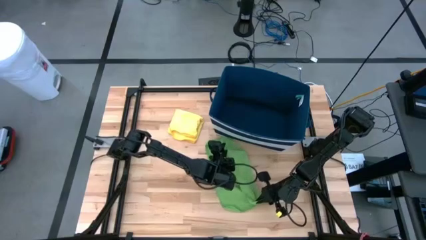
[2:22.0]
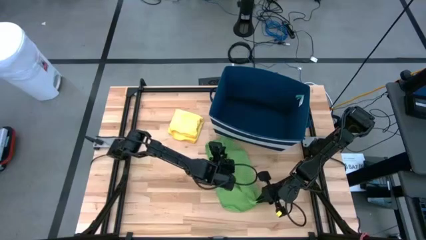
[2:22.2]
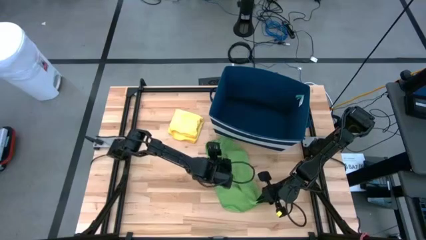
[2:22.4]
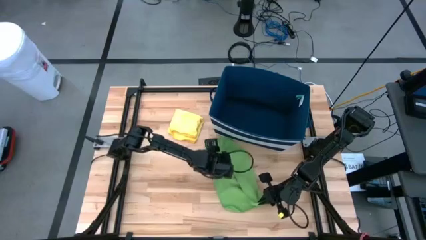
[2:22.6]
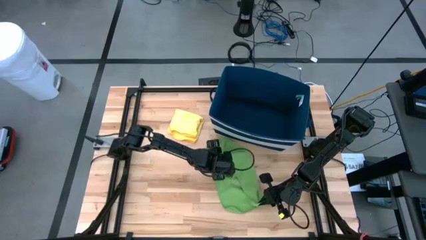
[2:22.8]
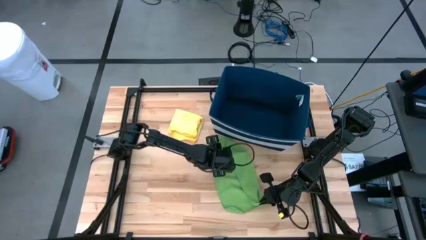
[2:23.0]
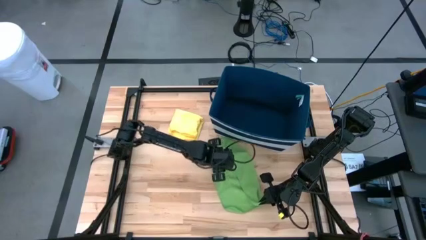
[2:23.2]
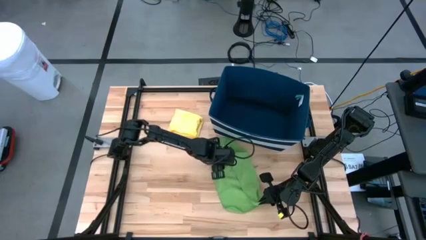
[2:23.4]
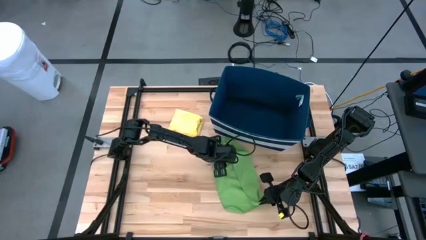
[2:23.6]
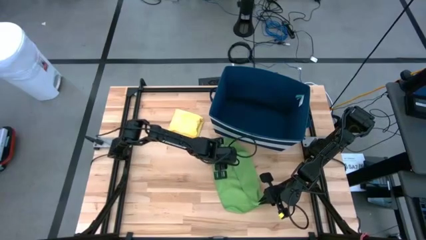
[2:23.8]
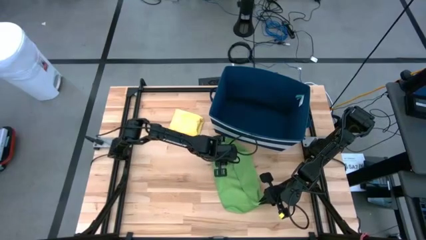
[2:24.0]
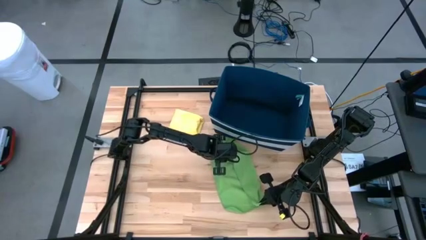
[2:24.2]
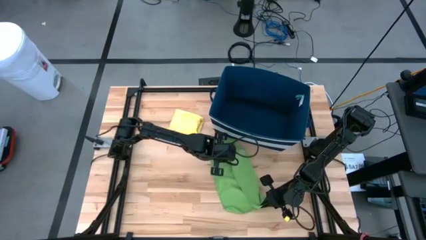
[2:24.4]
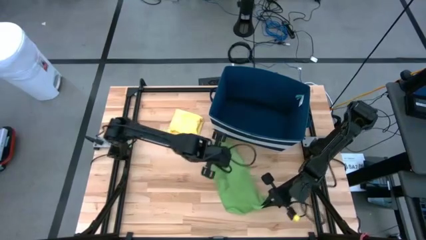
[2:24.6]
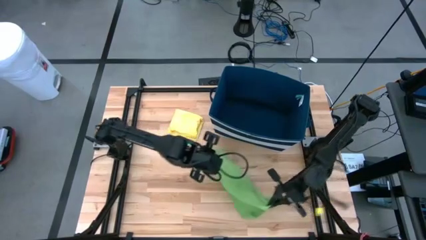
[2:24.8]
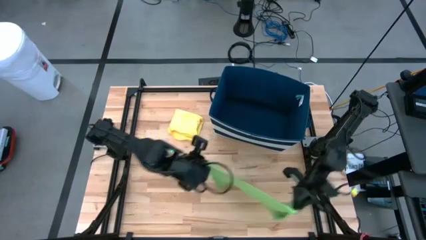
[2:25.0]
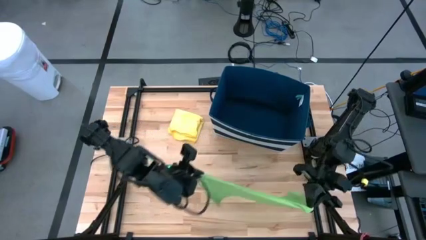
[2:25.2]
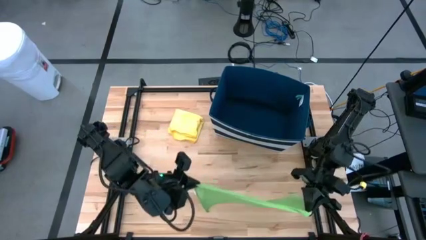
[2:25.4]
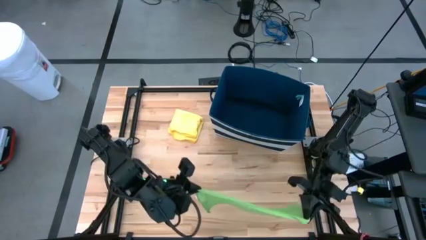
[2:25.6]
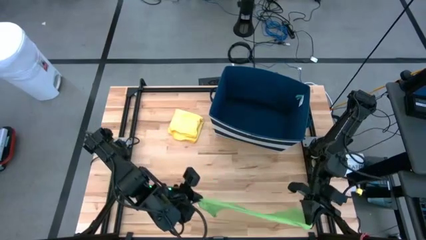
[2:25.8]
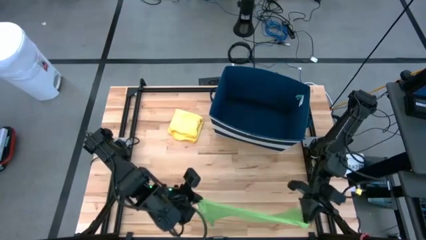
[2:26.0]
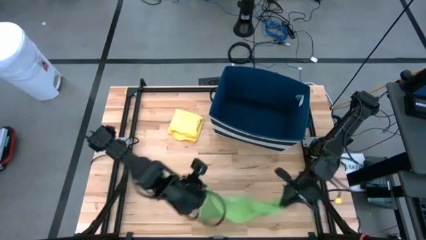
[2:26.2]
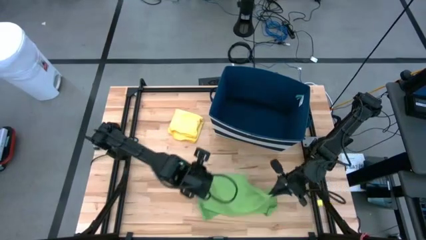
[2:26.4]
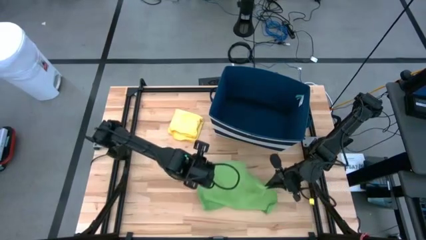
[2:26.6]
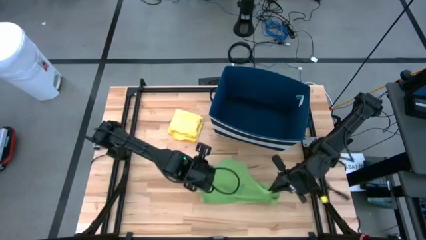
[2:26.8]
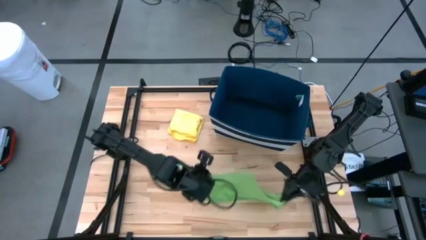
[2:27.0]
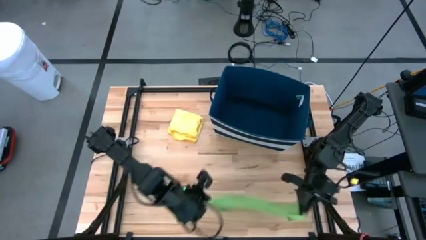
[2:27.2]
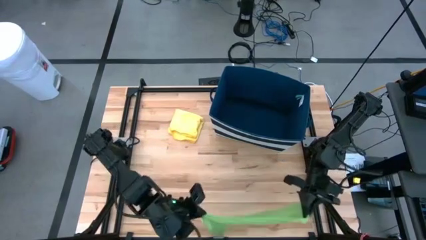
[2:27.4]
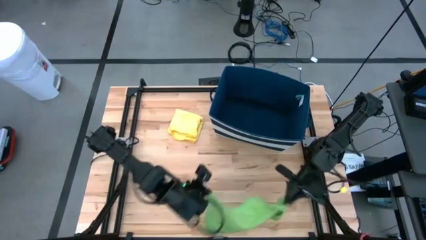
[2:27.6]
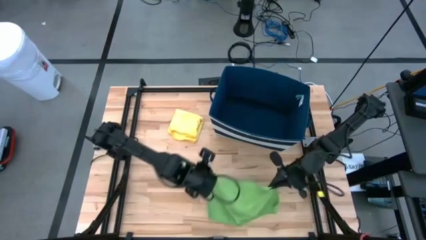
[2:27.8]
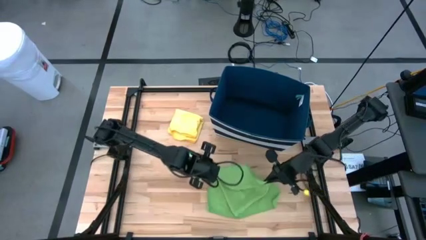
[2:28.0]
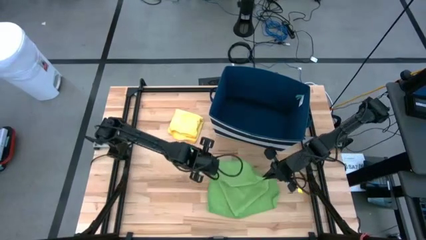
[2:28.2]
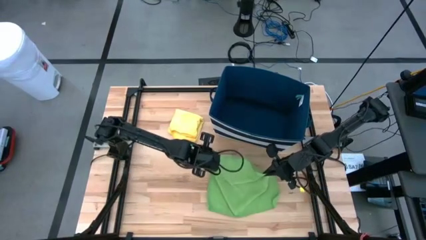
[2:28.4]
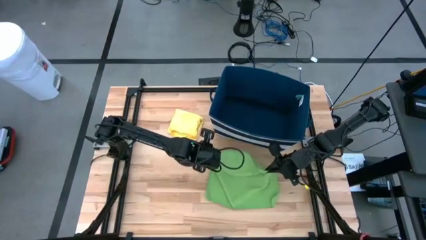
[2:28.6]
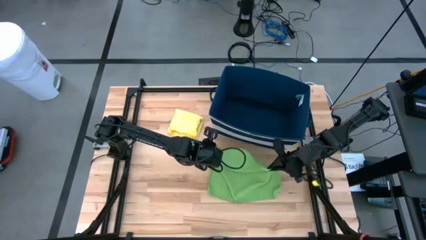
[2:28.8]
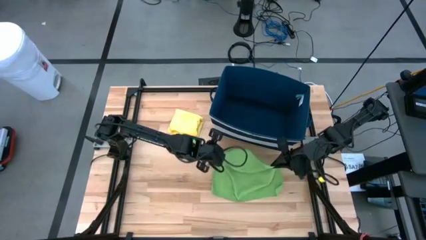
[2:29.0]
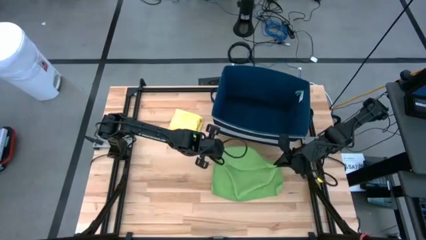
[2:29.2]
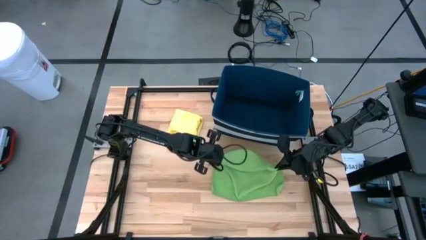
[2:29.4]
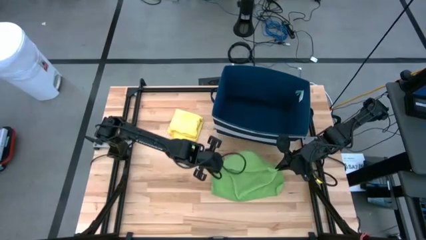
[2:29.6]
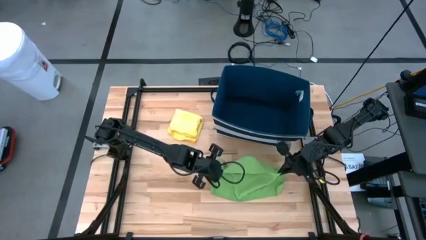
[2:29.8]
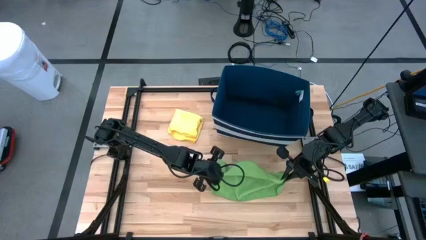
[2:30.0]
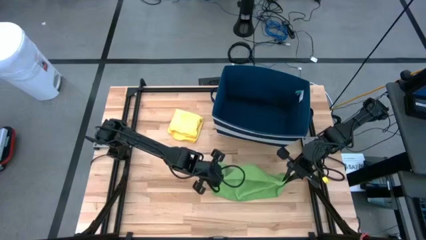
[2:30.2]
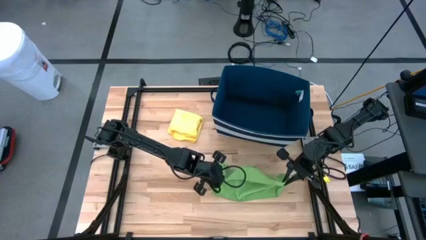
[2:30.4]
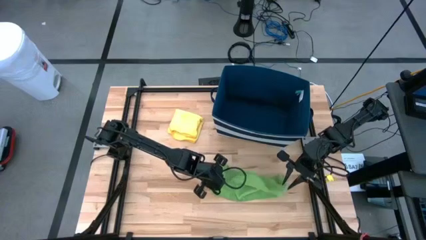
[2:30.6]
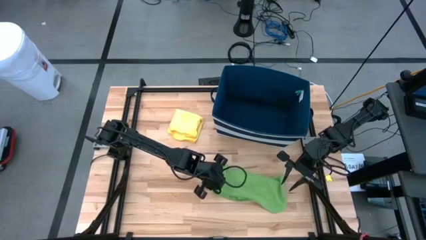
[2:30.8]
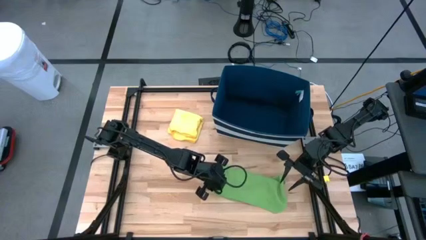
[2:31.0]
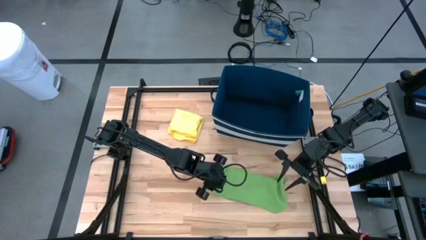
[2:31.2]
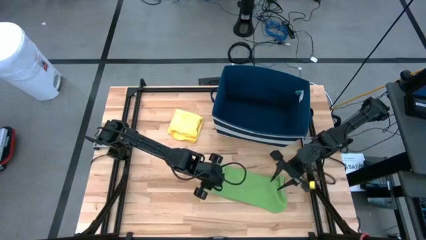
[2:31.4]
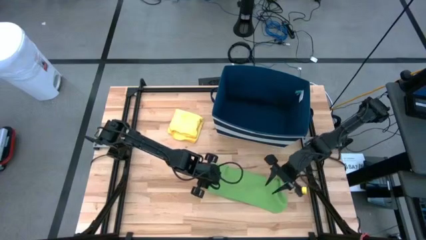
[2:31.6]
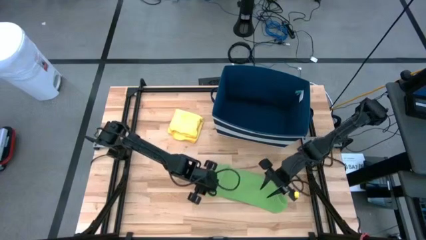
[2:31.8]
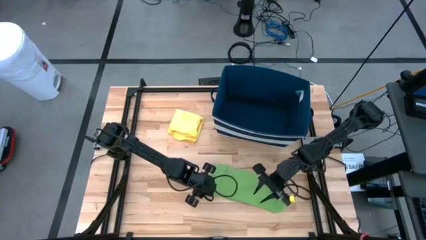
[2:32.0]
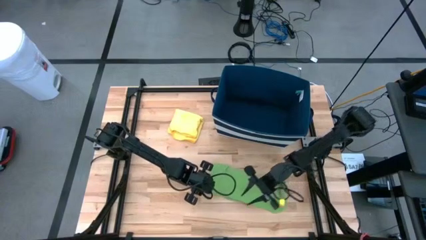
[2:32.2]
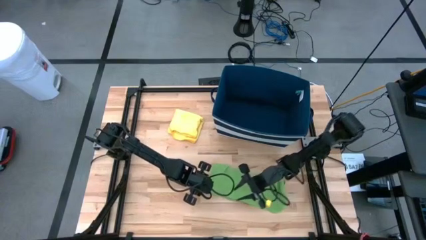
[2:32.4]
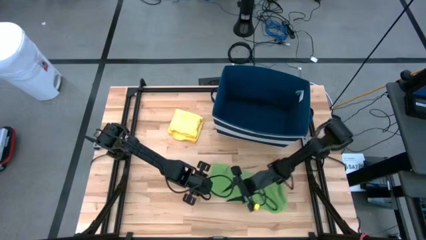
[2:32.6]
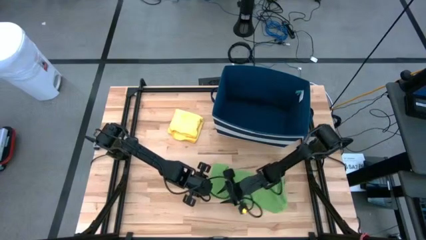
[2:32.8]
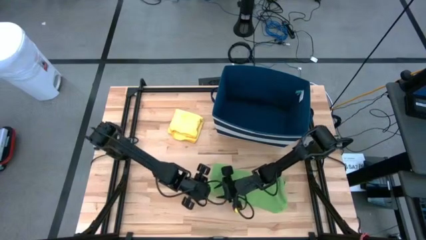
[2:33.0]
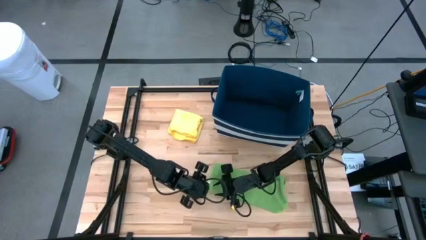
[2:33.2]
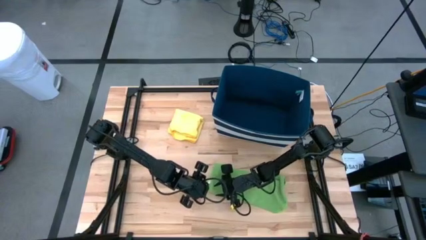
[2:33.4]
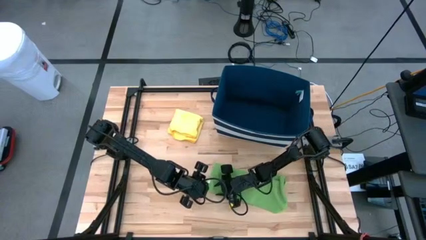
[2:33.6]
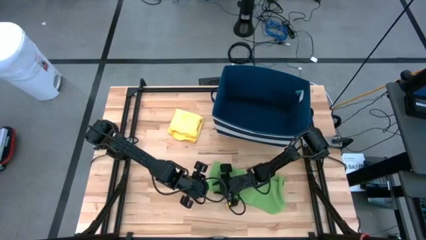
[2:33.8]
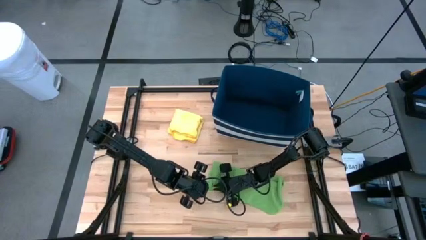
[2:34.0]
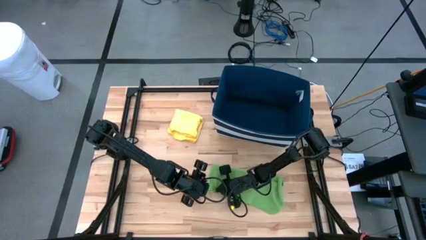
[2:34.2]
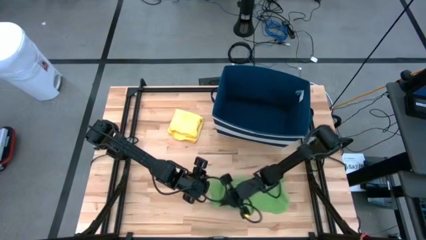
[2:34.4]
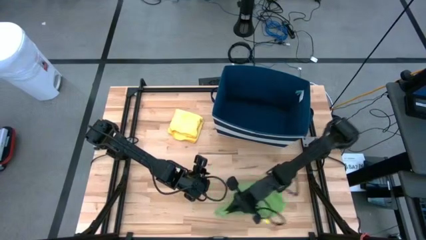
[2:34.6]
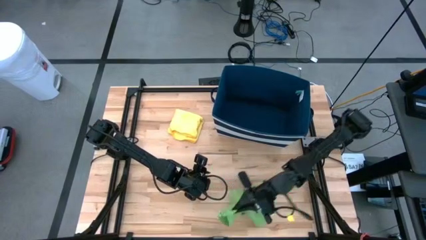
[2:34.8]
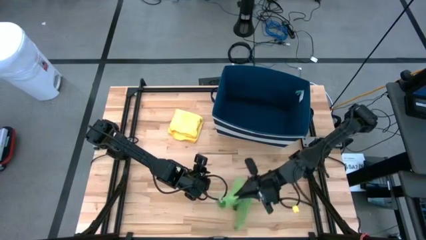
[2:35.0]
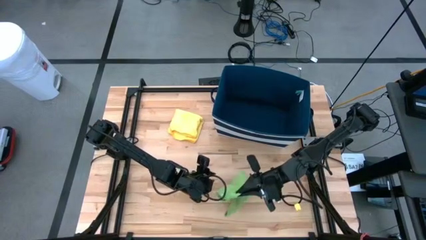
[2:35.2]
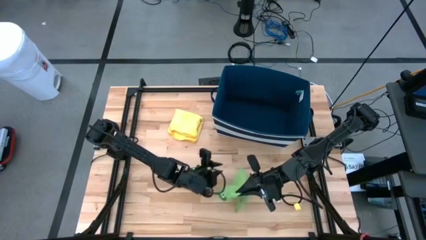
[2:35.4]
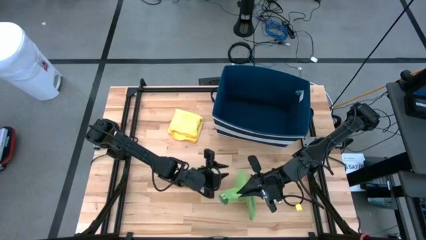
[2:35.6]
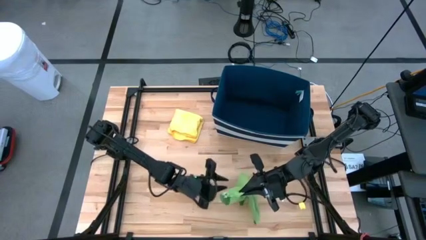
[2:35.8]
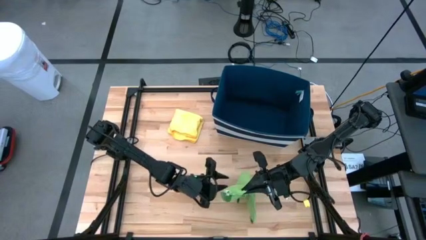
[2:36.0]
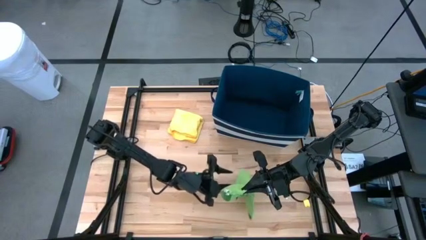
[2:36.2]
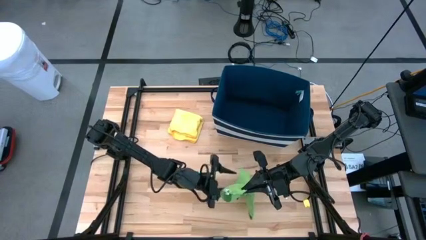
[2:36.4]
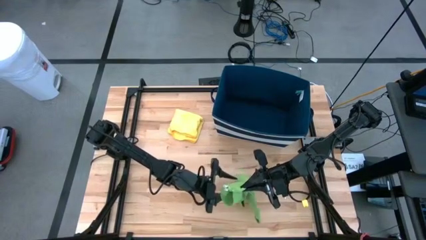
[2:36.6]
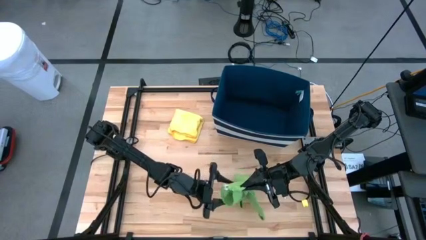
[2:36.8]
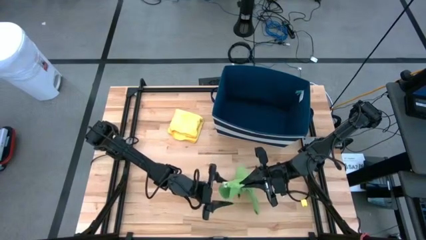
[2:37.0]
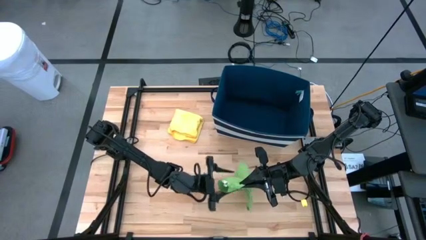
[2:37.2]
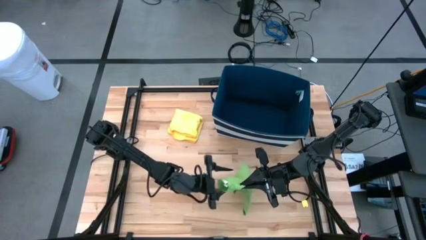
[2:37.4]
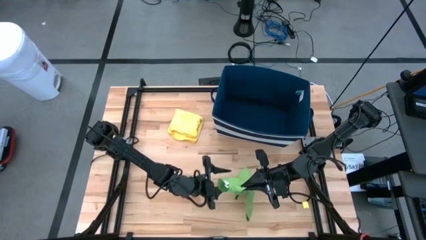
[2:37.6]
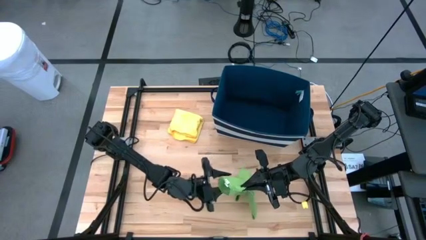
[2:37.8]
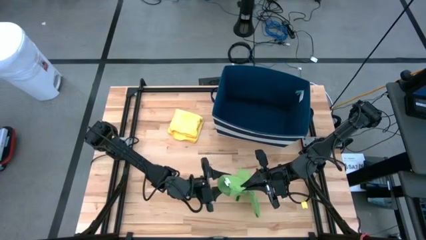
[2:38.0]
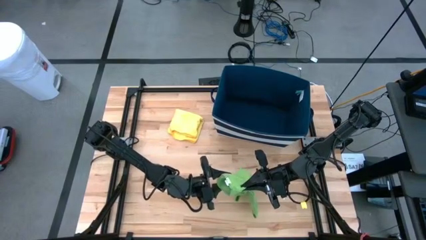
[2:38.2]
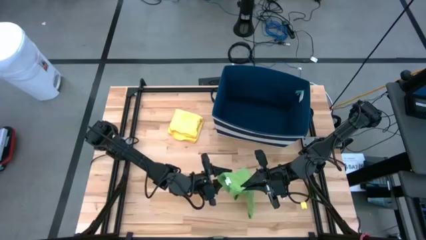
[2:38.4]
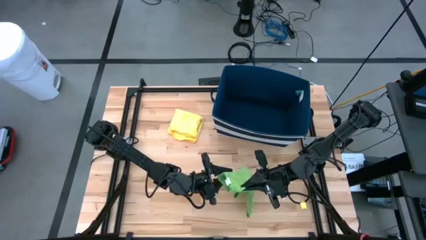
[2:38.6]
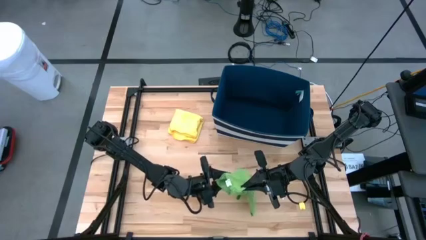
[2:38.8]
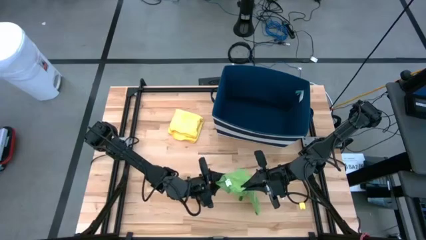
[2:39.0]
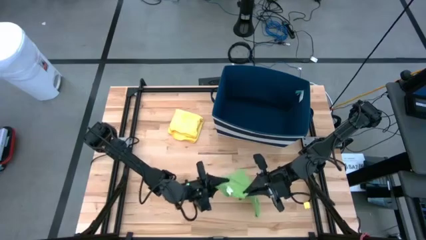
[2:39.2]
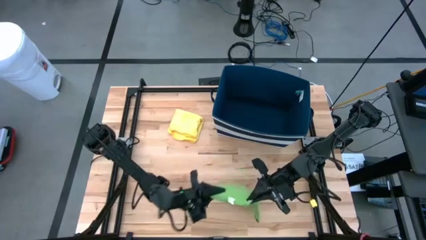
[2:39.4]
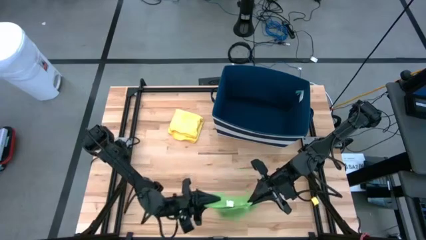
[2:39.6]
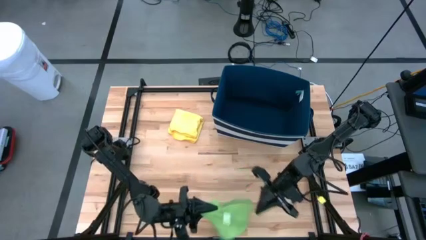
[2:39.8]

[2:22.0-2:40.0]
Task: Fold towel
Fold the green towel
